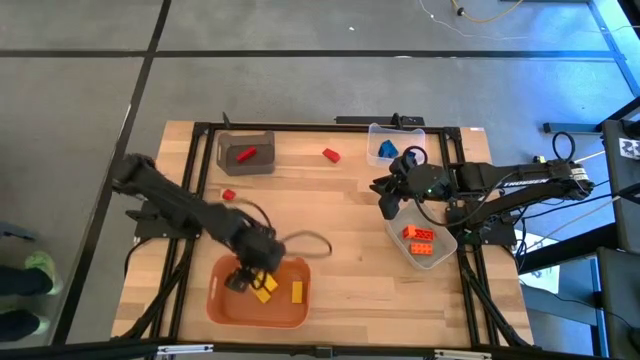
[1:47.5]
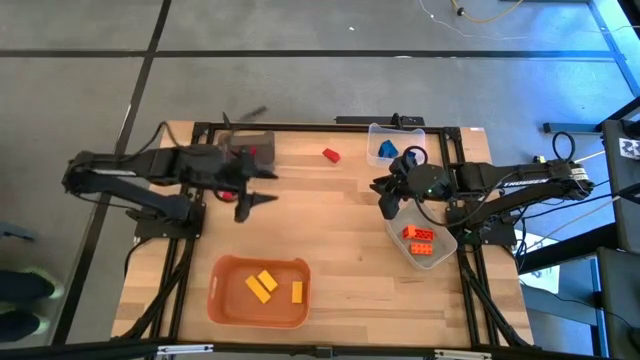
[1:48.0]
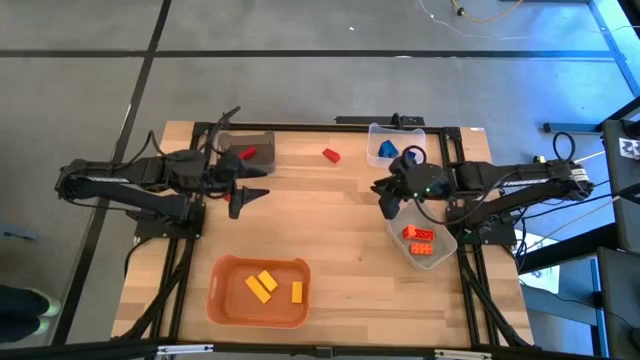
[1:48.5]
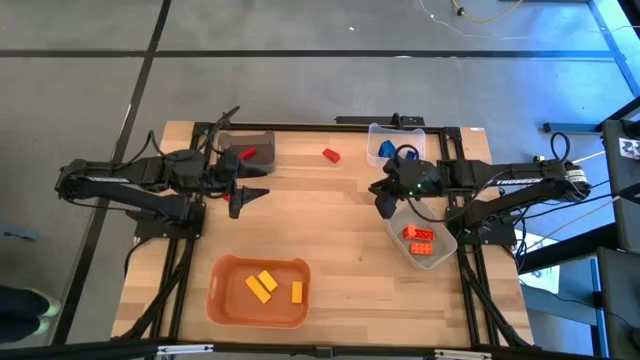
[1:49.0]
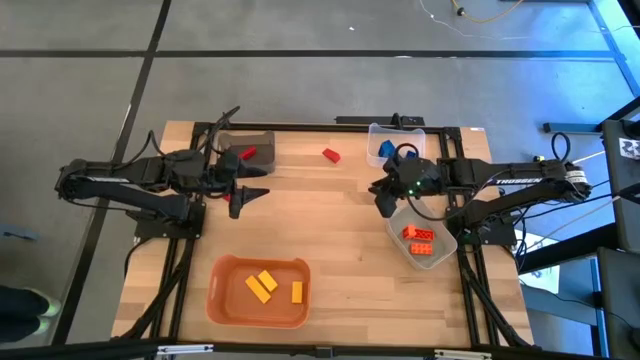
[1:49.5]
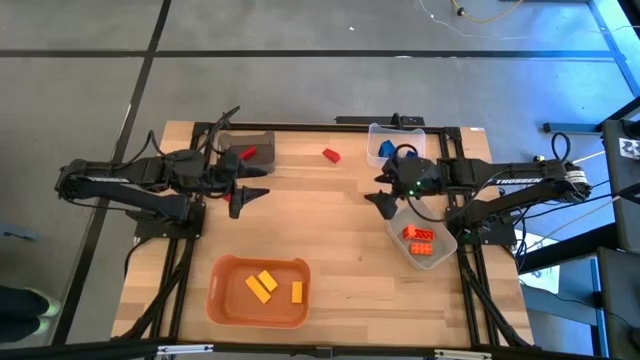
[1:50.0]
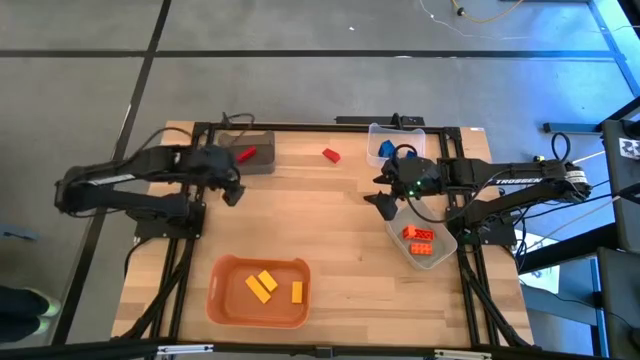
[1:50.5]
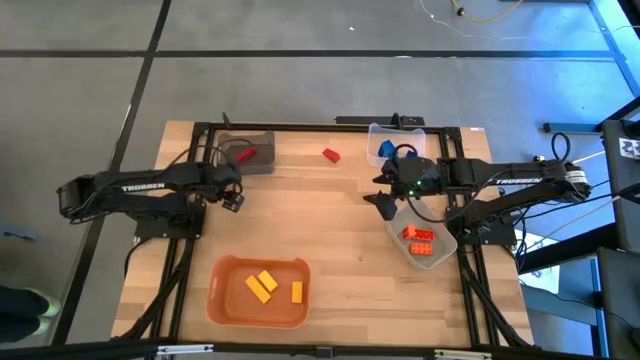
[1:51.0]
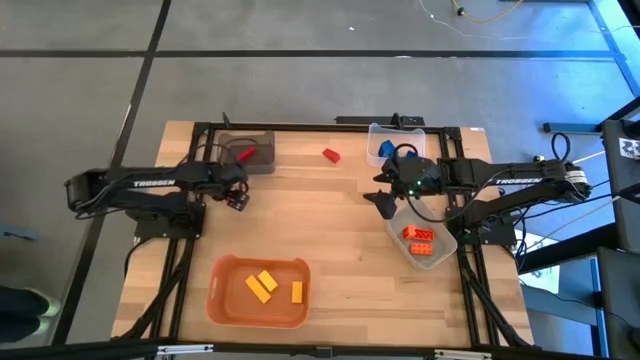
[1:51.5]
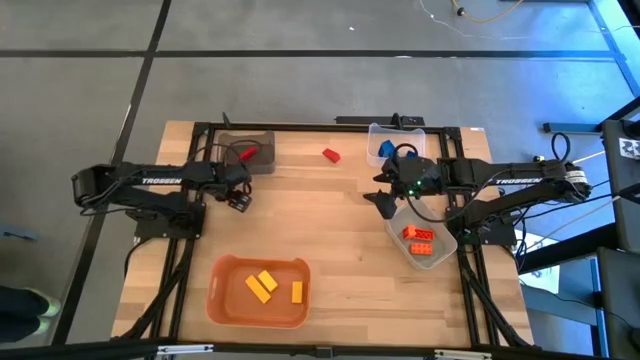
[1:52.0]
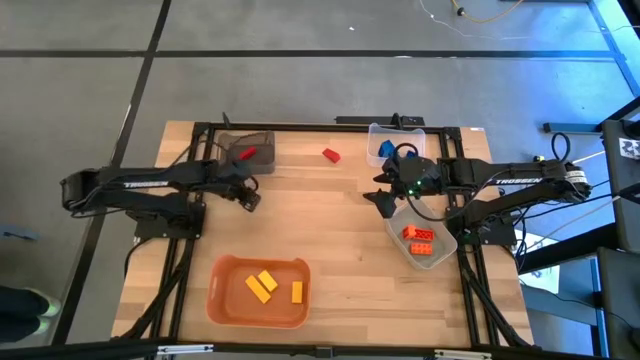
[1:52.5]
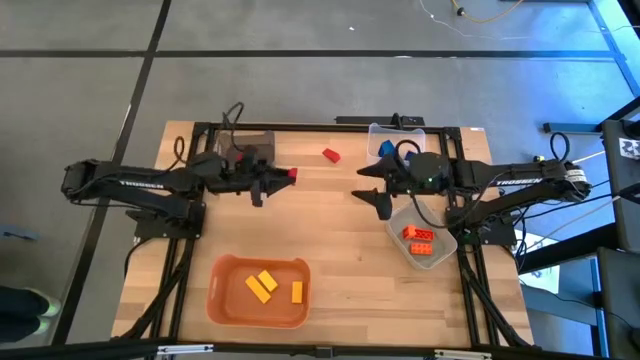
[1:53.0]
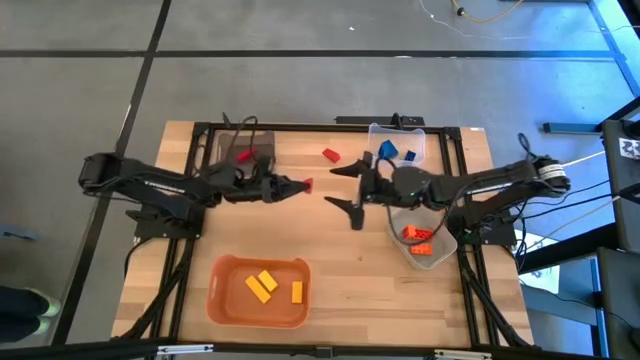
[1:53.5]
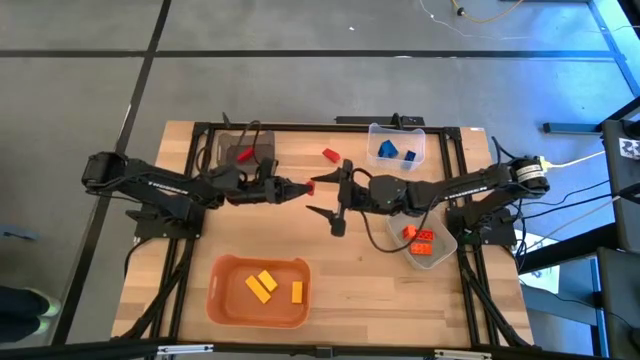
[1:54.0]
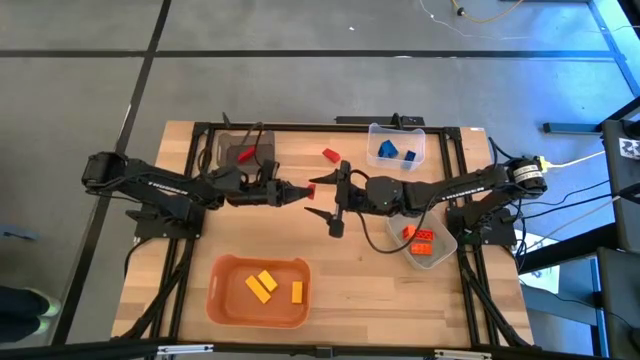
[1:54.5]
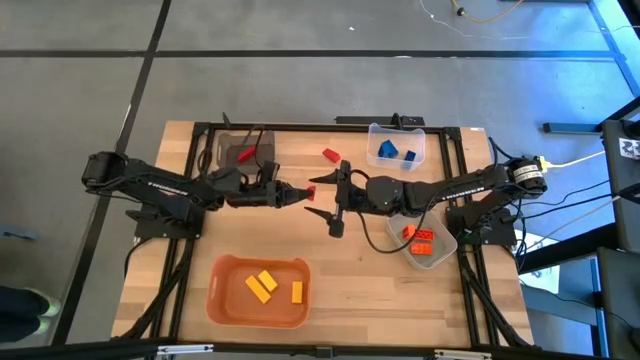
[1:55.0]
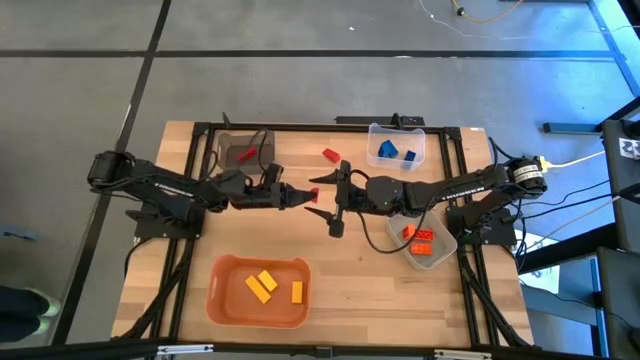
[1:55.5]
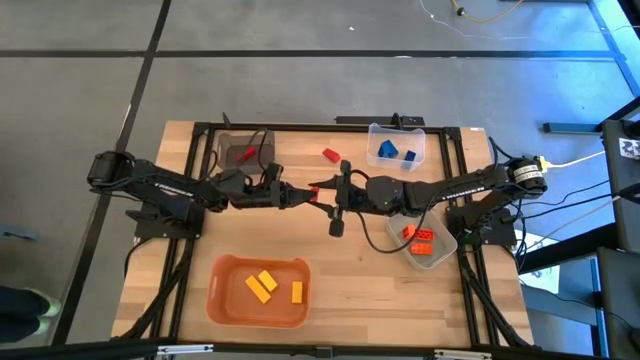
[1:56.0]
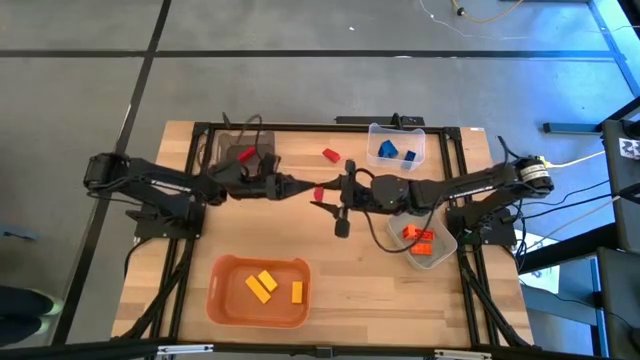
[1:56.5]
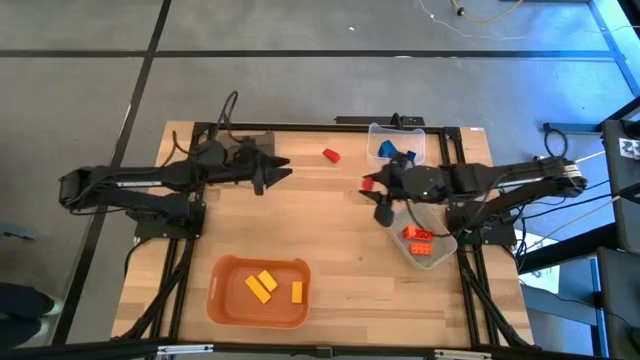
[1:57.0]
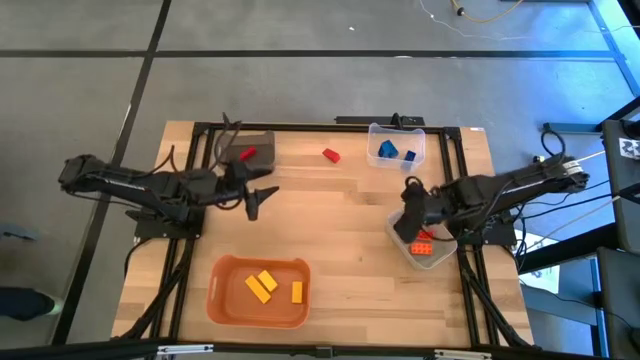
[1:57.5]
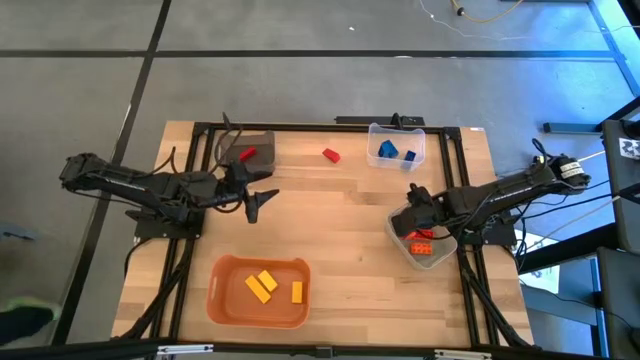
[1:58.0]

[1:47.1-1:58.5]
Task: Sort & place blocks by color
Put the bottom red block into the black transparent bin

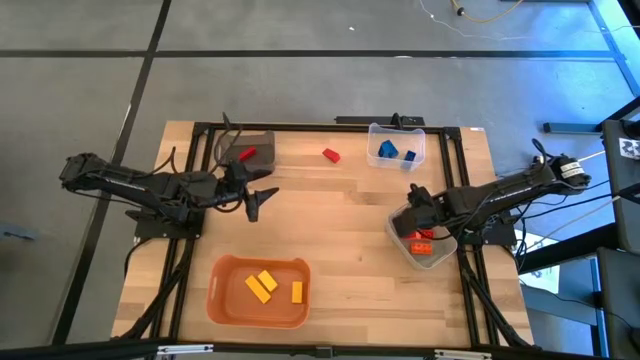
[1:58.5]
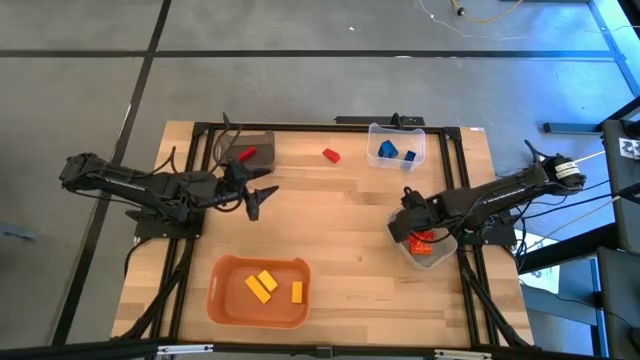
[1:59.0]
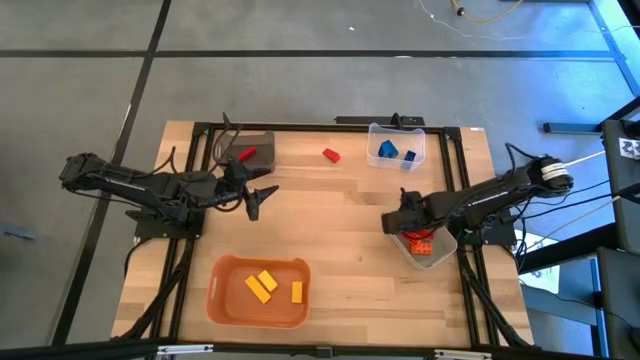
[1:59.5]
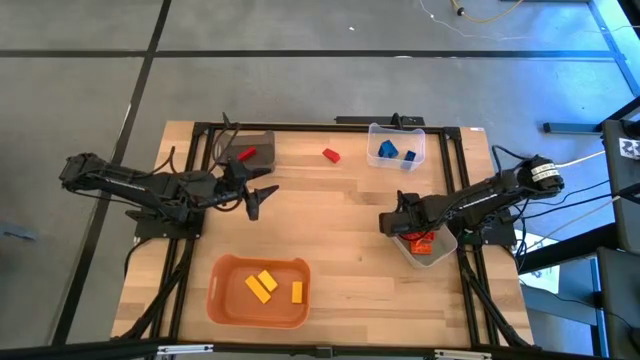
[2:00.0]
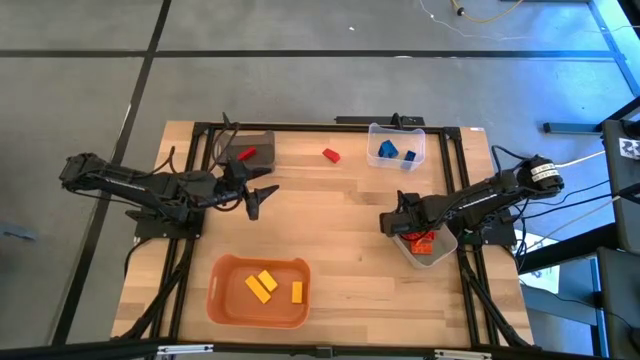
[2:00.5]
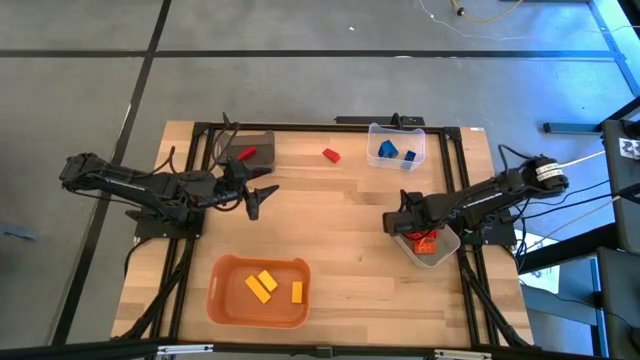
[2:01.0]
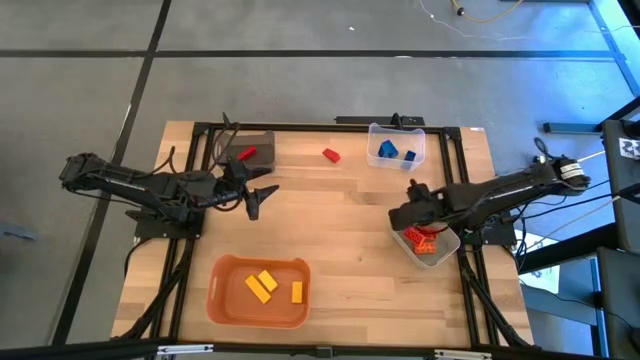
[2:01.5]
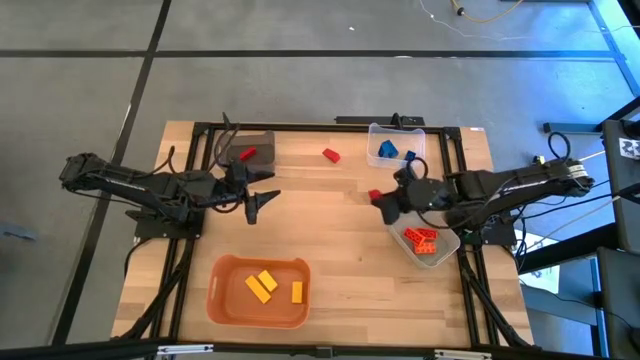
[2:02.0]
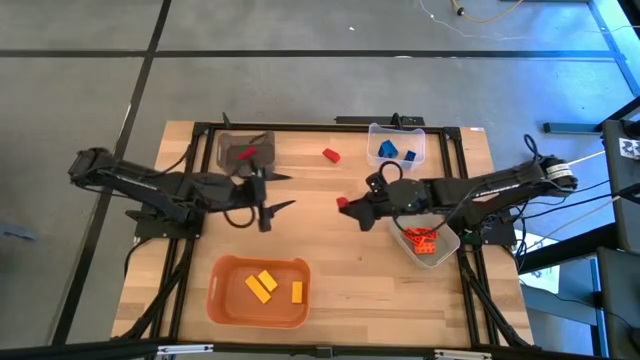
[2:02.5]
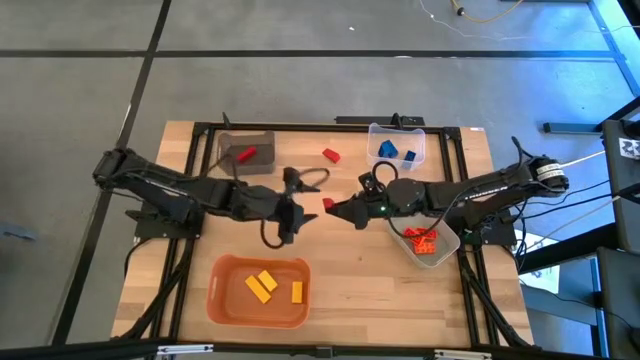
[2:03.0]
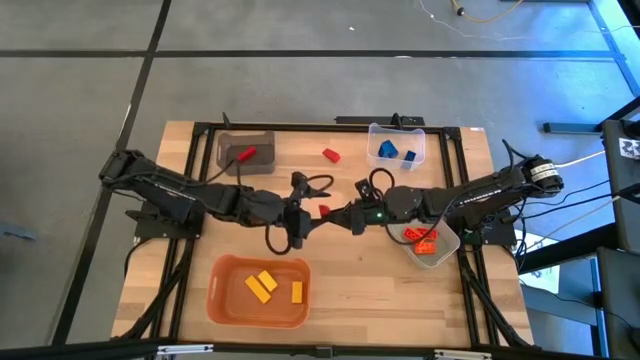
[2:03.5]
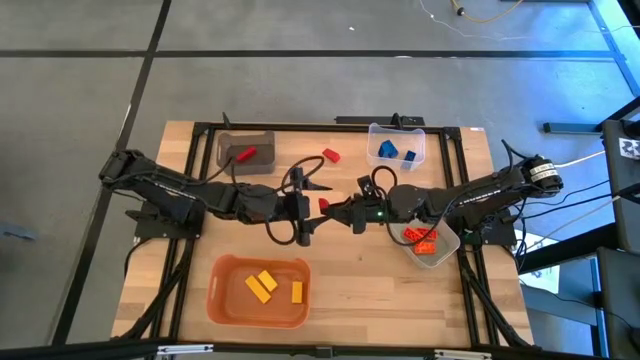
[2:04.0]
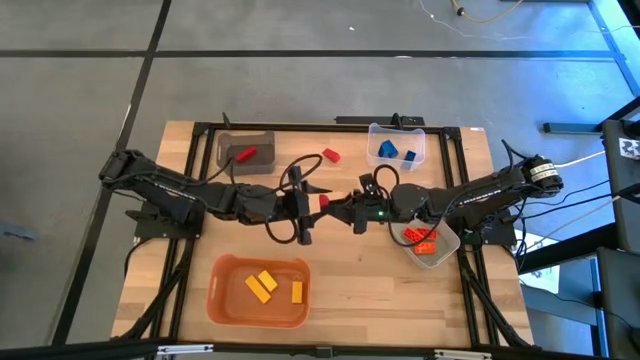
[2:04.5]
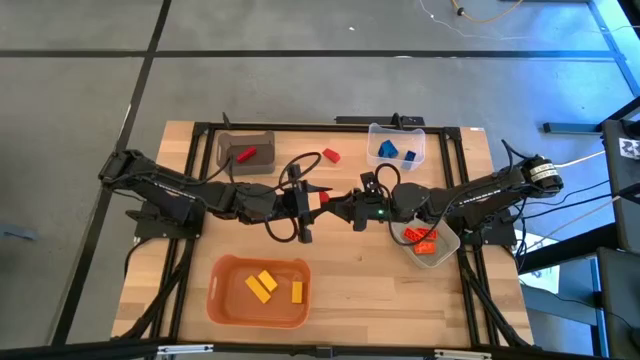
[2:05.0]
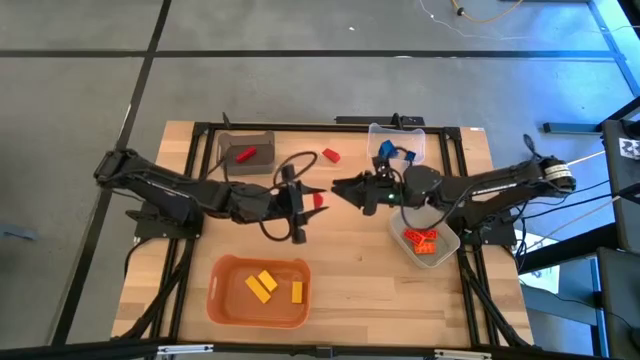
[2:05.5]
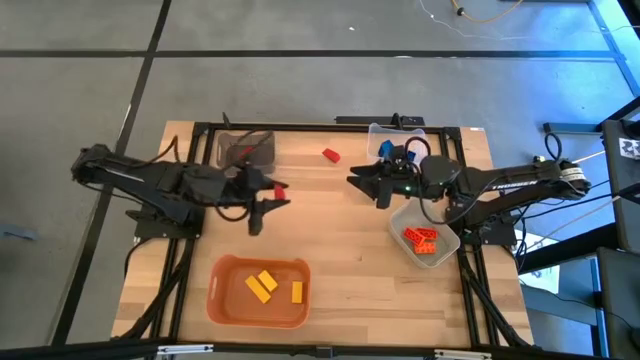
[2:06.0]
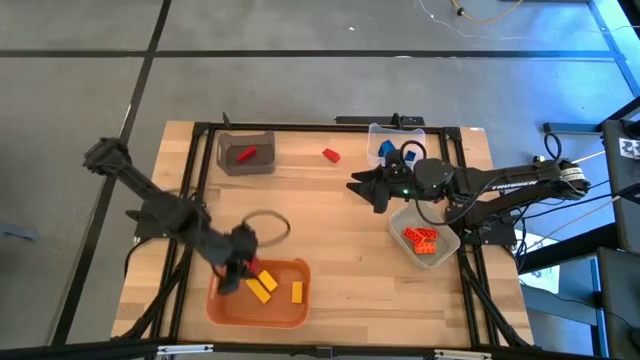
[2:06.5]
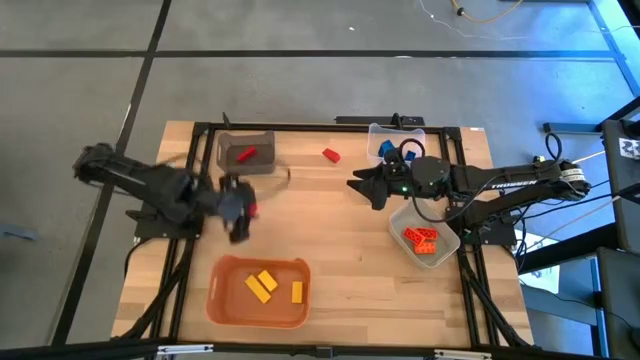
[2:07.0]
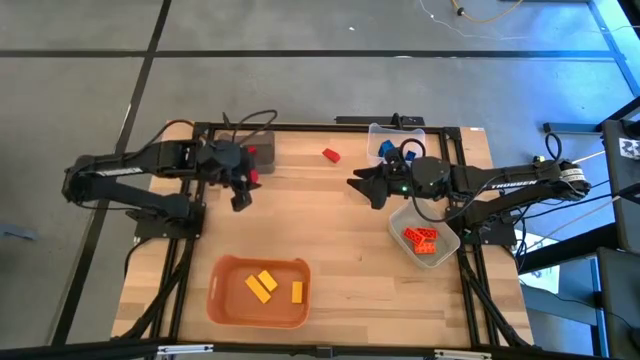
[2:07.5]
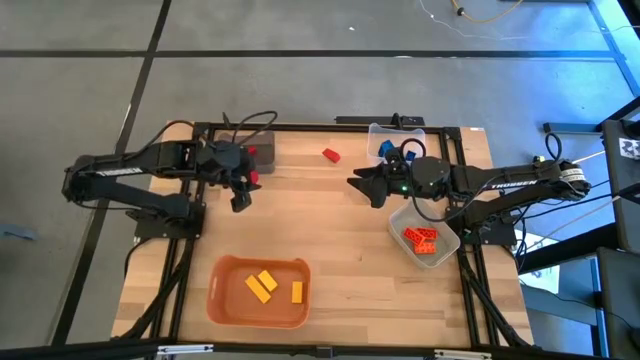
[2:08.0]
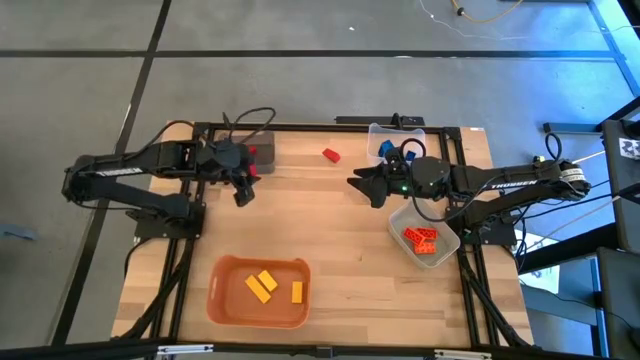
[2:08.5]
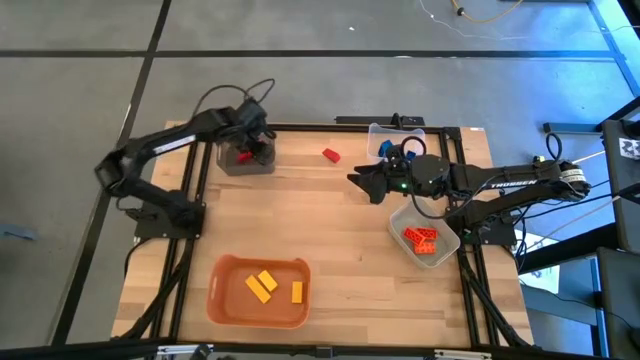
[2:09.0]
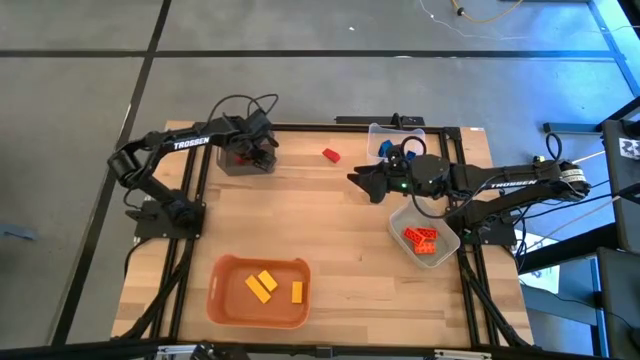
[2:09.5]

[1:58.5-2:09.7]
Put the bottom red block into the black transparent bin
